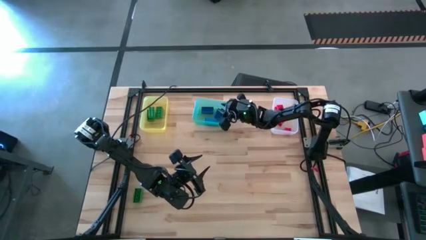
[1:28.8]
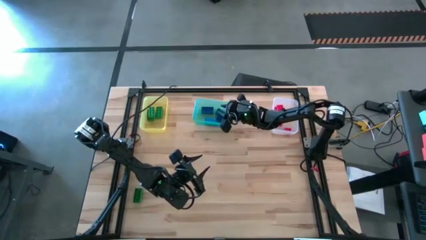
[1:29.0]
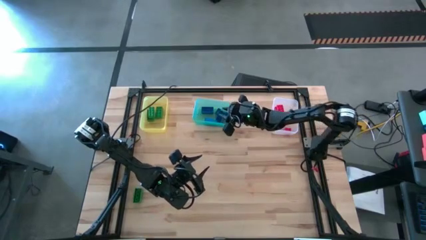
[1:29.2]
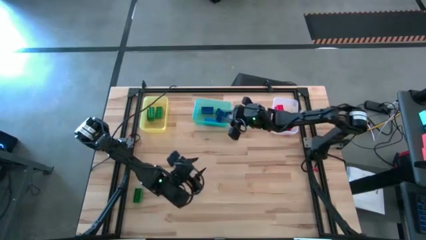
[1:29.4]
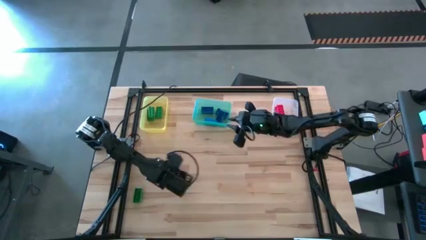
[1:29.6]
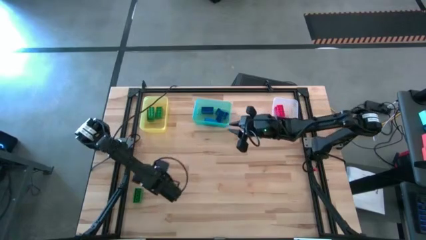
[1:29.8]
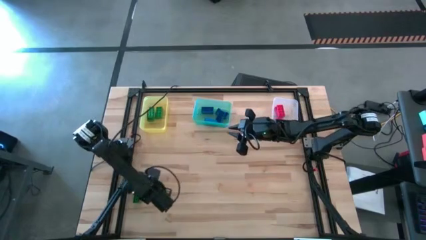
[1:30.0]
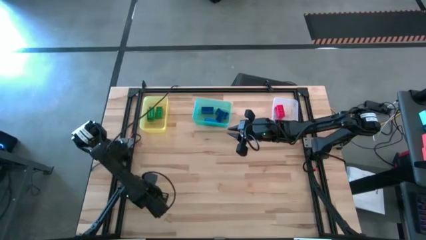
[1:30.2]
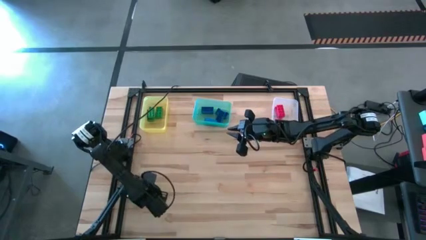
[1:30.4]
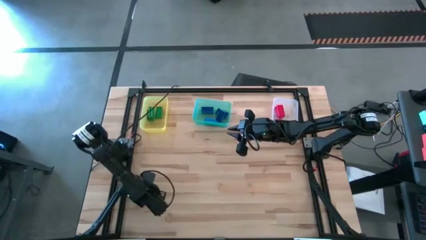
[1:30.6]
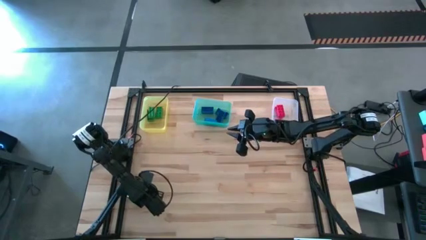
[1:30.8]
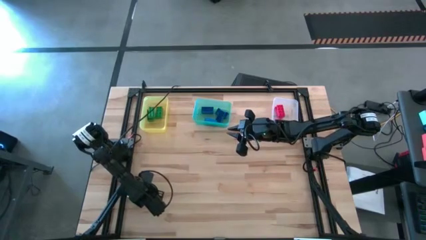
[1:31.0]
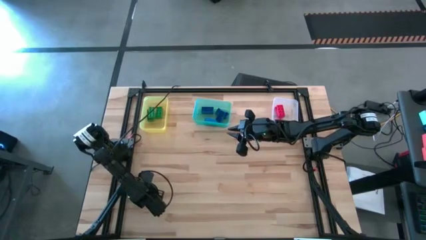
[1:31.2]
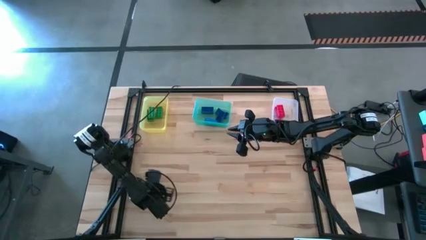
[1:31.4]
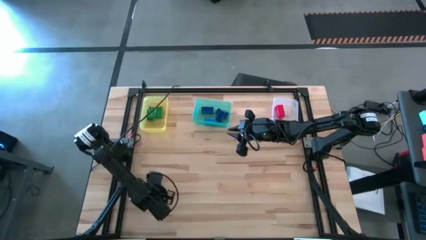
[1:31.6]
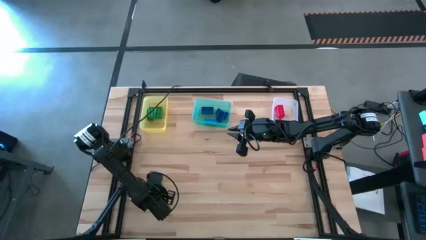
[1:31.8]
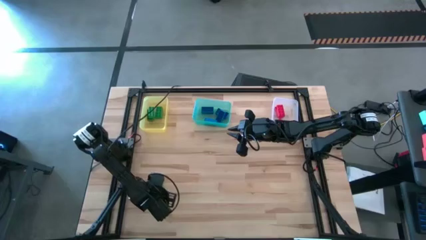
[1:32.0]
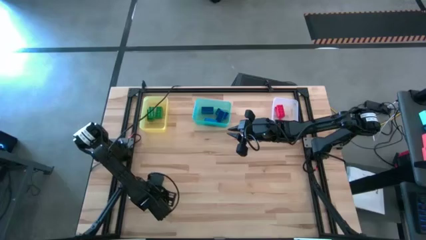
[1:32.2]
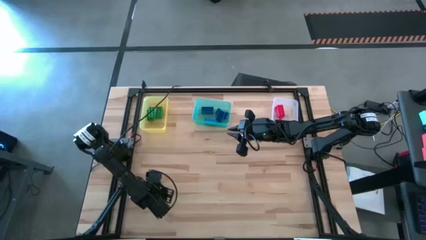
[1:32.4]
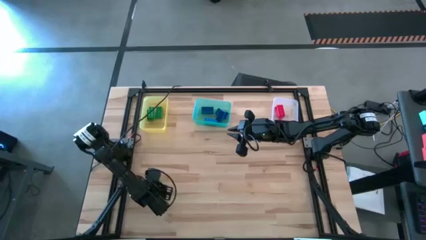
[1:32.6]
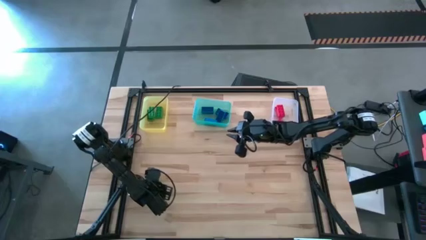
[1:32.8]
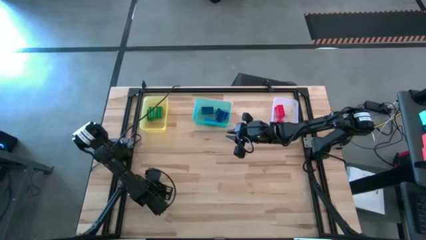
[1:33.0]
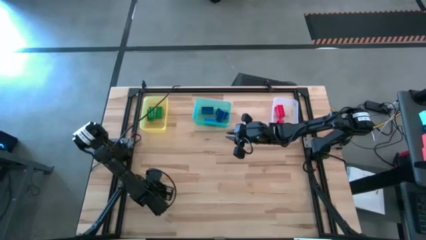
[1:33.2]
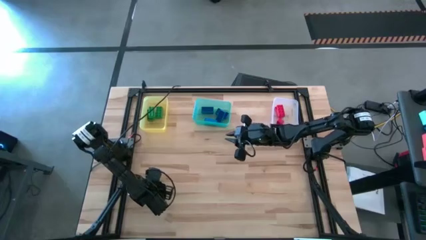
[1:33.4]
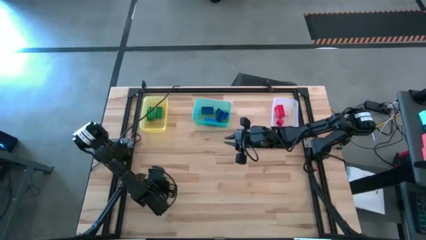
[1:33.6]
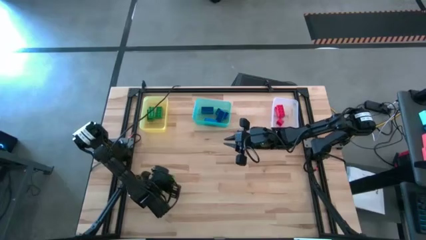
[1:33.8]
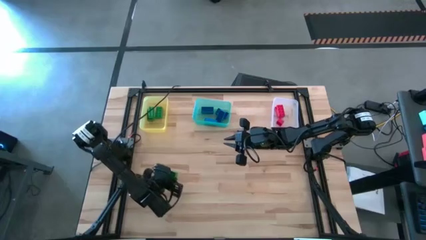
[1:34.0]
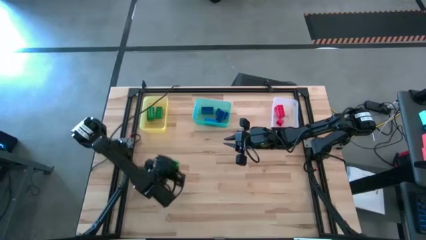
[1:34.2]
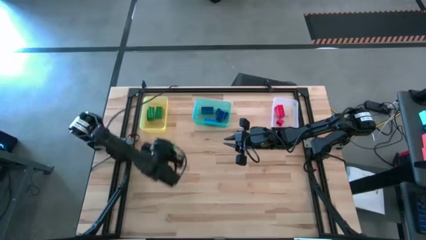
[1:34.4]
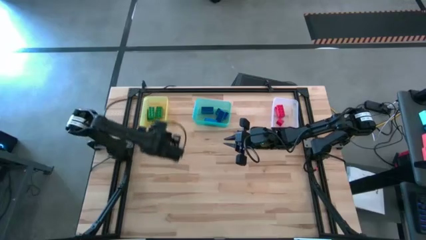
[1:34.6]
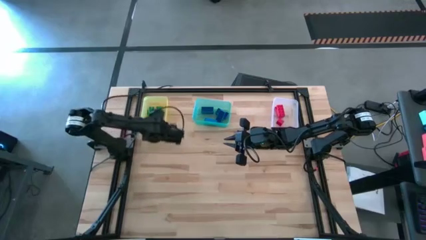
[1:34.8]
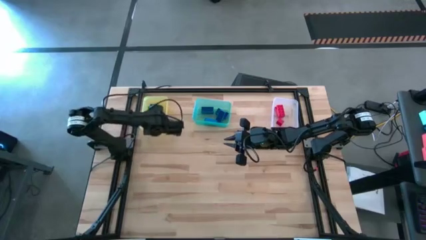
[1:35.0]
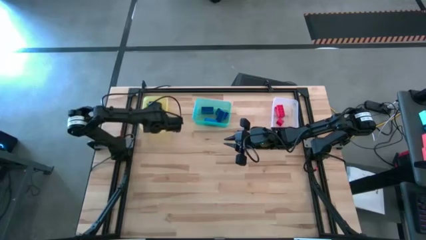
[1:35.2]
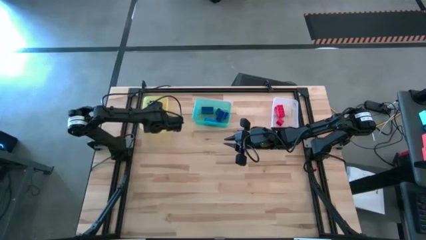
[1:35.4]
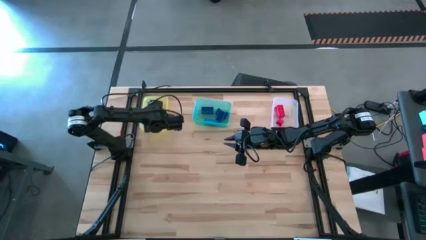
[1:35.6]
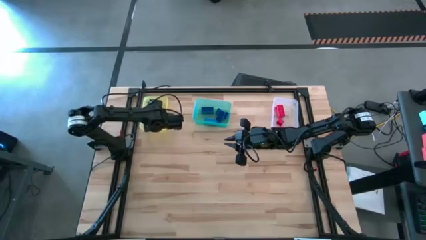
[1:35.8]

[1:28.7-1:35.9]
Task: Sort & place blocks by color
Put the green game piece into yellow bin

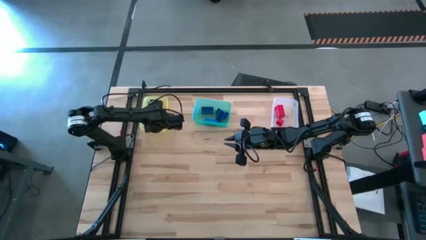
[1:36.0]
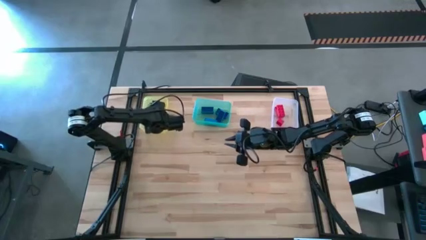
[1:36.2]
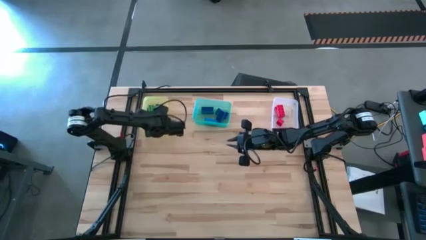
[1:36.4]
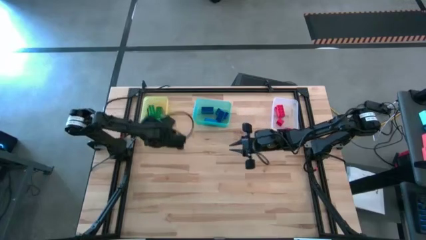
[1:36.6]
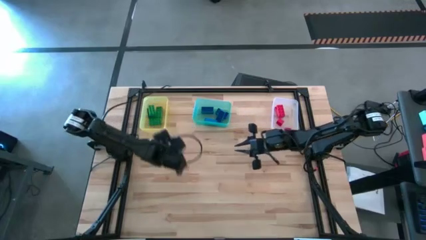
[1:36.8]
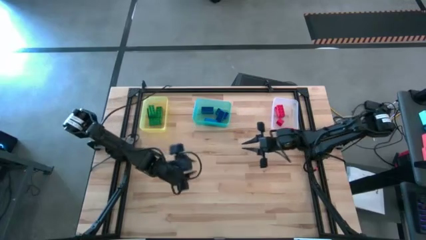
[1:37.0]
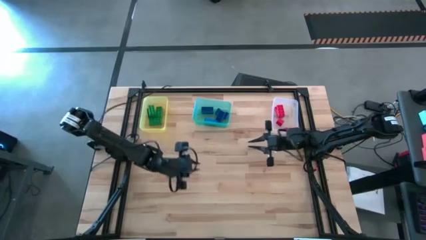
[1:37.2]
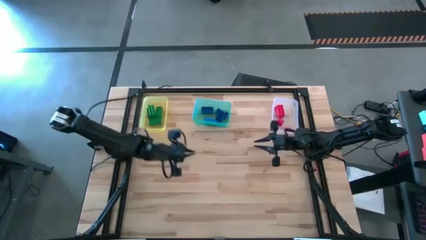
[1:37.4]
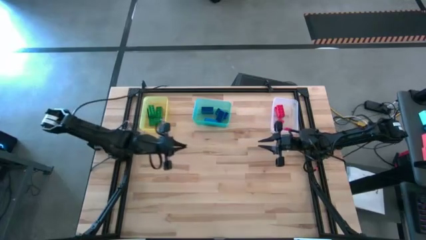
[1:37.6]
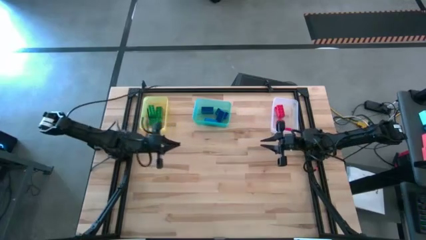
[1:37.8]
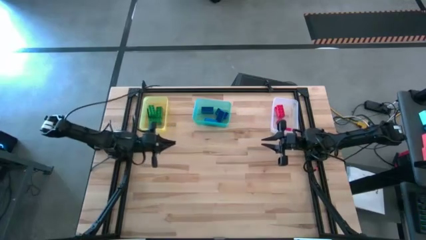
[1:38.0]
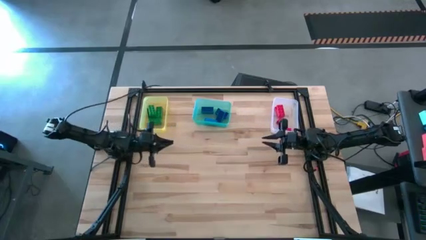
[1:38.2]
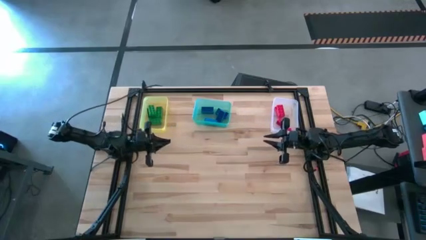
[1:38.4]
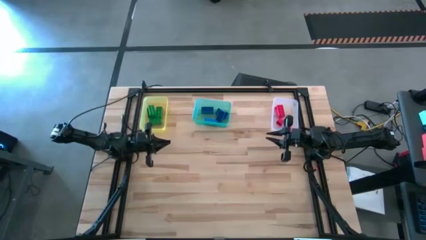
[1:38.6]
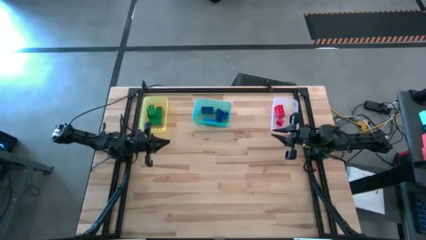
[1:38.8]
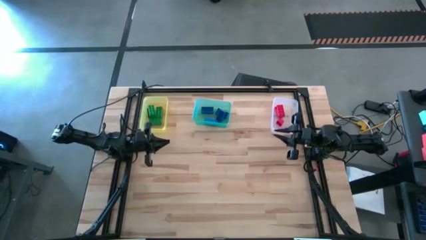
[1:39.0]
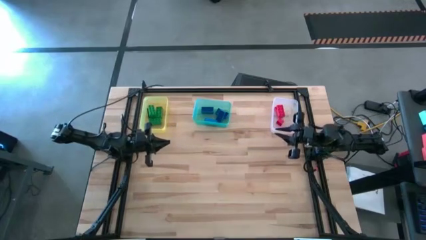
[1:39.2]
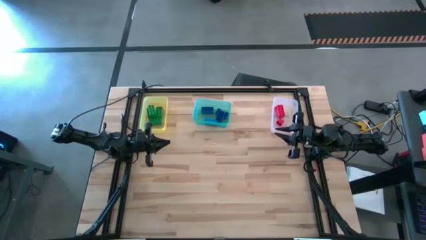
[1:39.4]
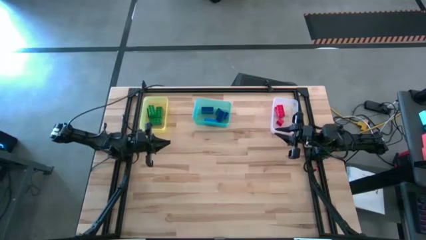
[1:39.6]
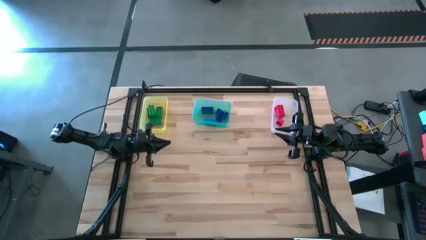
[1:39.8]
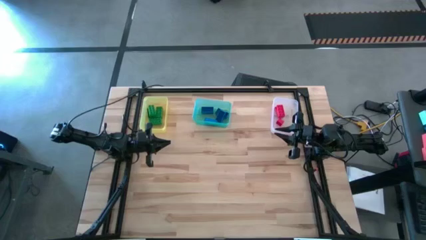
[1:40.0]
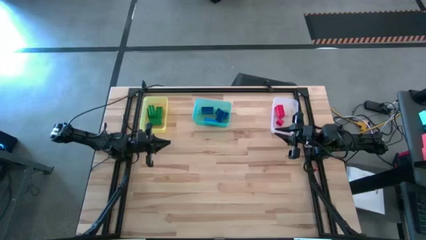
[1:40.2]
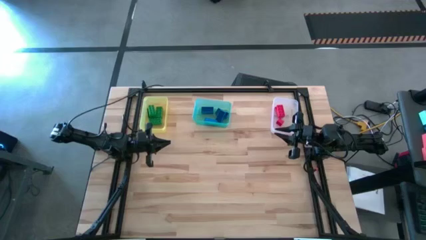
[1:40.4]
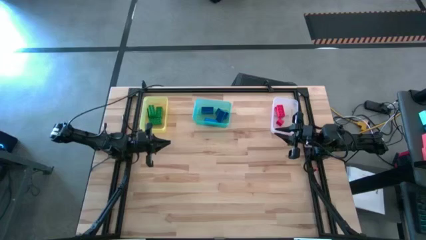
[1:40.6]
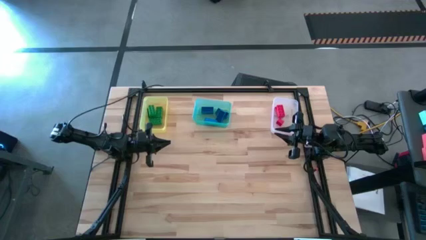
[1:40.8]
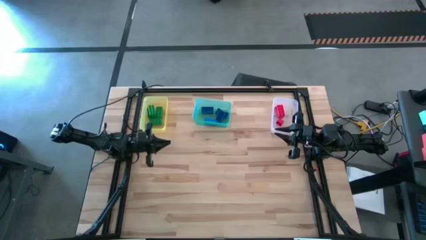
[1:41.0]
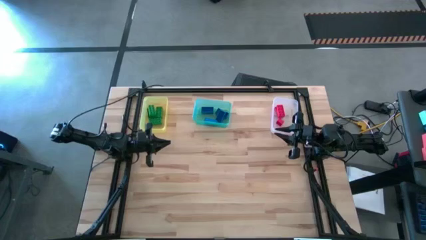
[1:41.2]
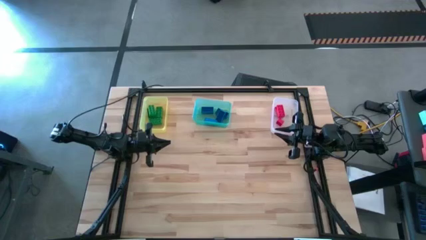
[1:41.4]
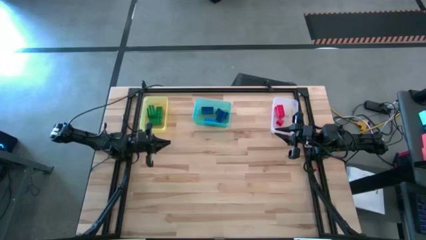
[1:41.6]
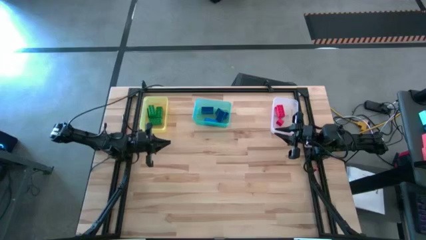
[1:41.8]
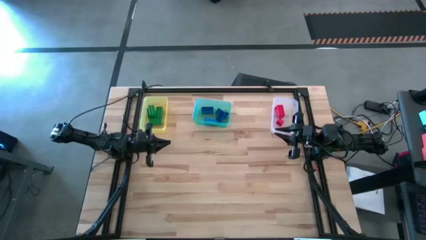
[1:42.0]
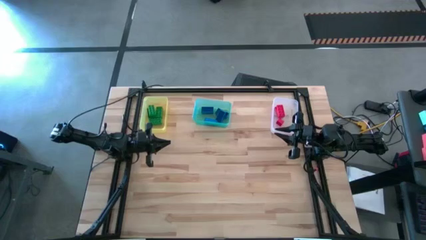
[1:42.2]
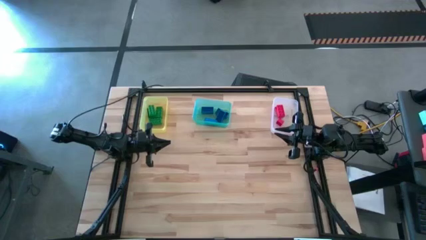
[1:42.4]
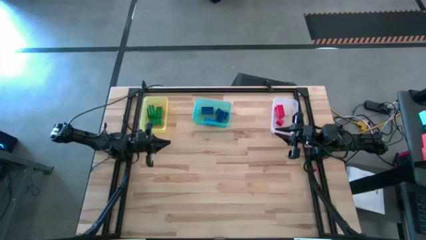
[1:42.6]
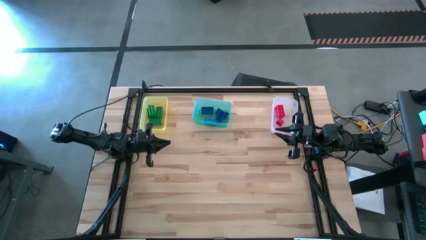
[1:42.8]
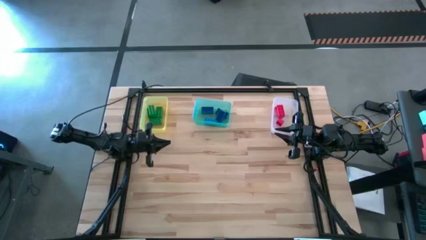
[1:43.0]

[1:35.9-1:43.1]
Return to home position

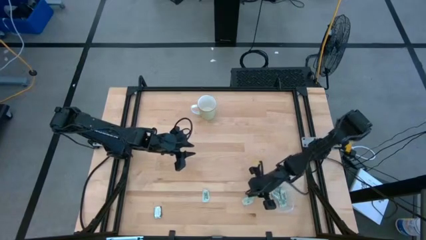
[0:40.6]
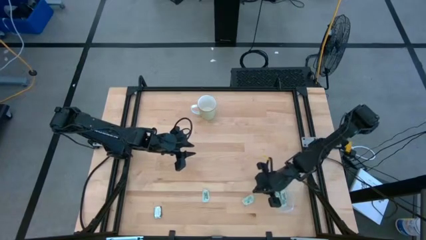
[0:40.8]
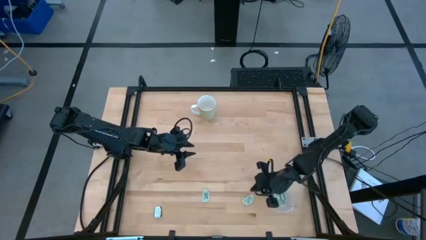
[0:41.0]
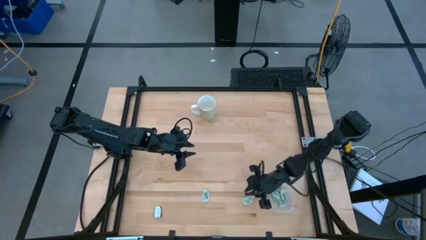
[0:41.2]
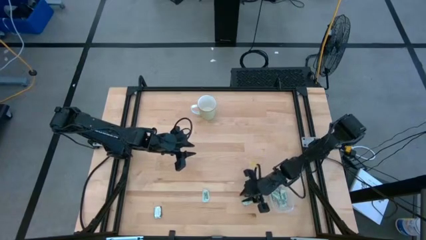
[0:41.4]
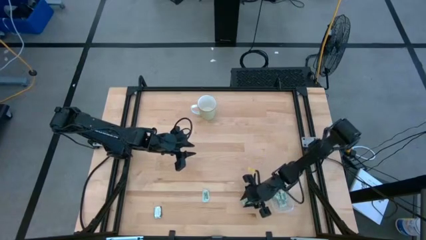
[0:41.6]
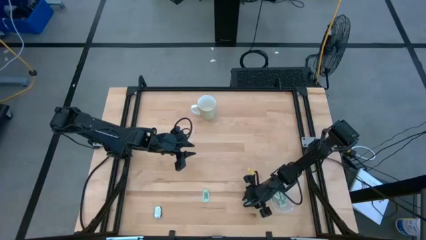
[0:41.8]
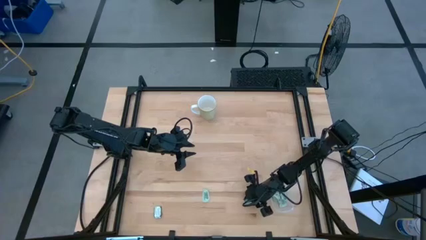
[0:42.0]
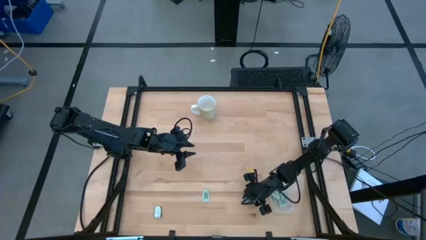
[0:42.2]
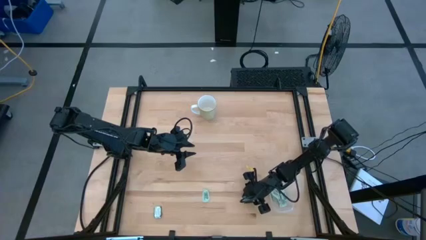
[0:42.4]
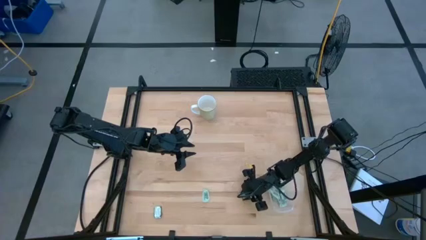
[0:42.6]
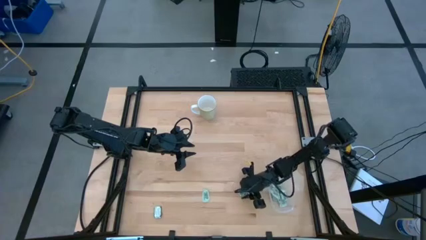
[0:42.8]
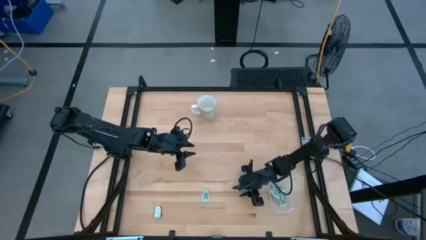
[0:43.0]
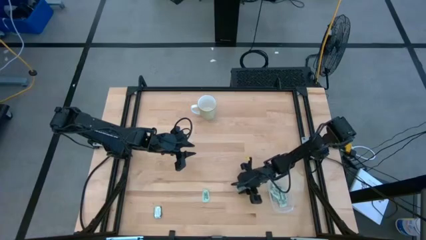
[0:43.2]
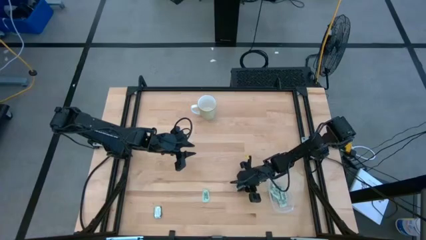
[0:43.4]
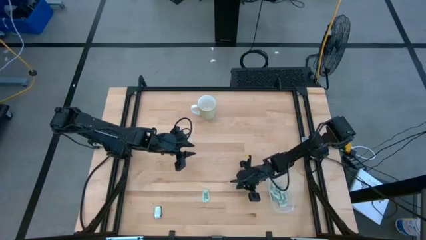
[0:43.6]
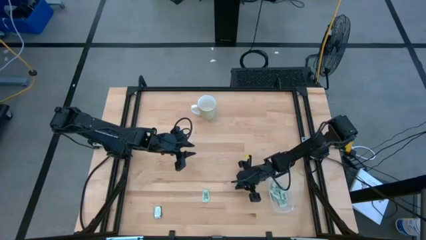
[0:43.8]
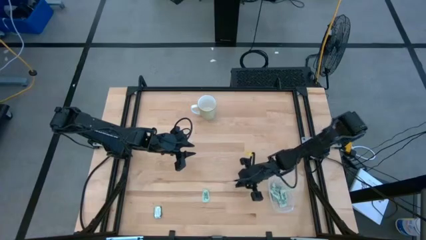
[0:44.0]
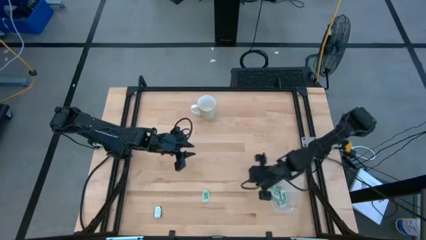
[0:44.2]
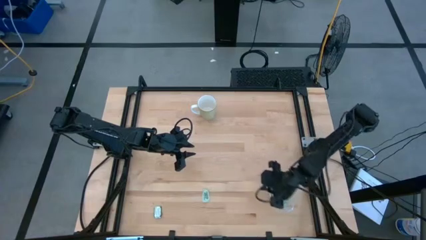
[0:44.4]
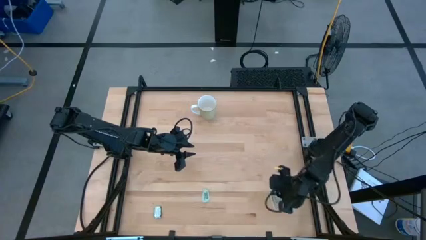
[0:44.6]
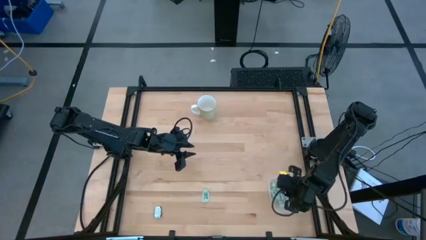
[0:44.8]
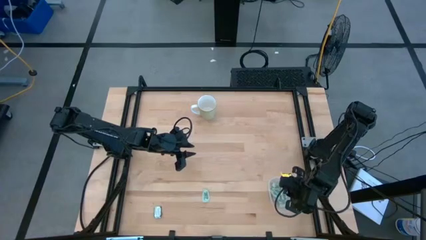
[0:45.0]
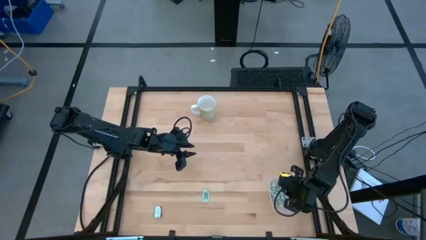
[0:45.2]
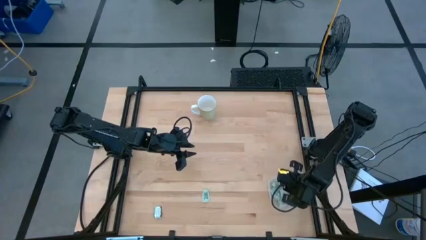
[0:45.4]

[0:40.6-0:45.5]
Task: Pick and place Stevia / Truvia into bins
Put the stevia packet into the transparent bin
